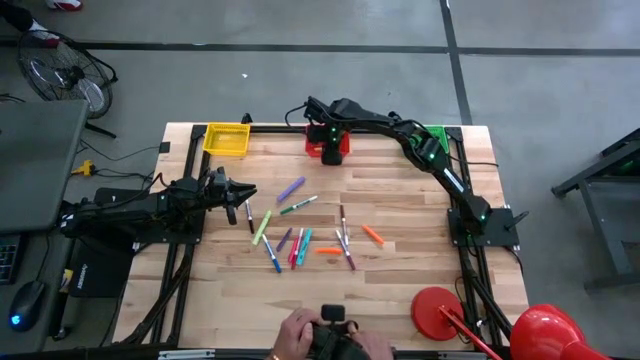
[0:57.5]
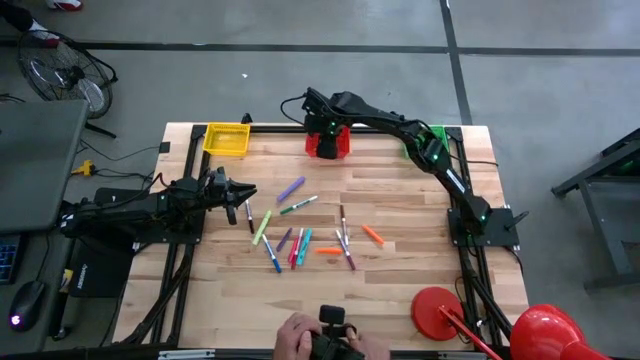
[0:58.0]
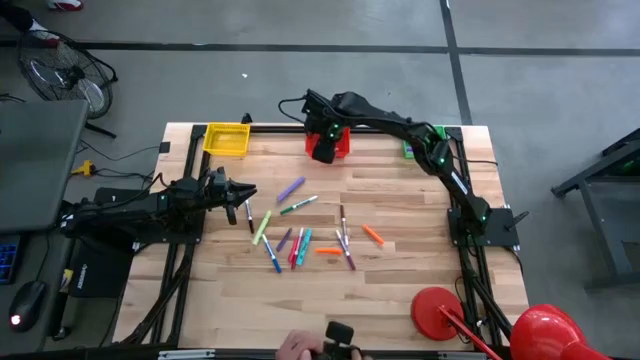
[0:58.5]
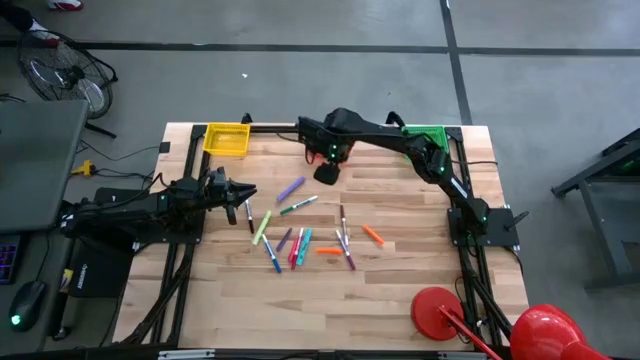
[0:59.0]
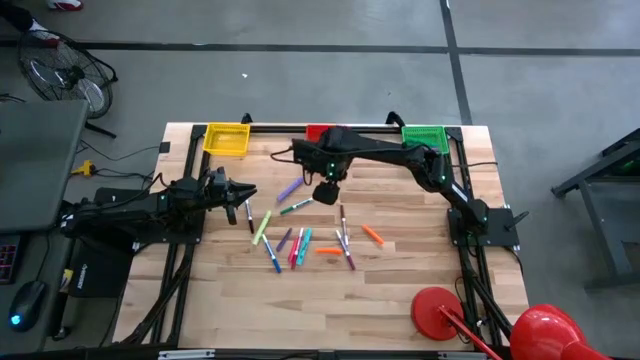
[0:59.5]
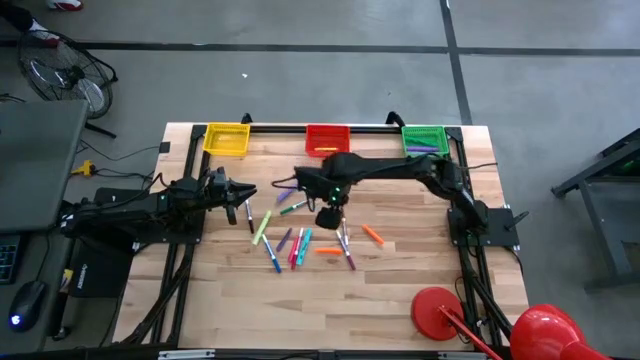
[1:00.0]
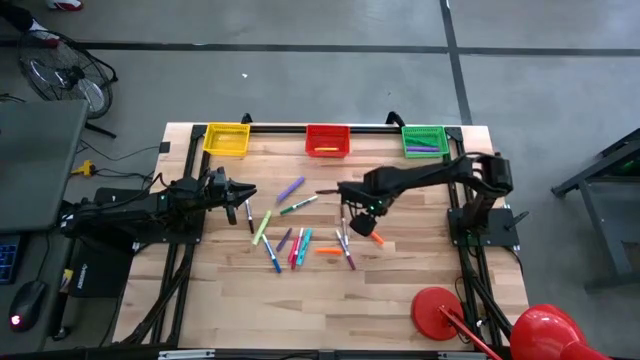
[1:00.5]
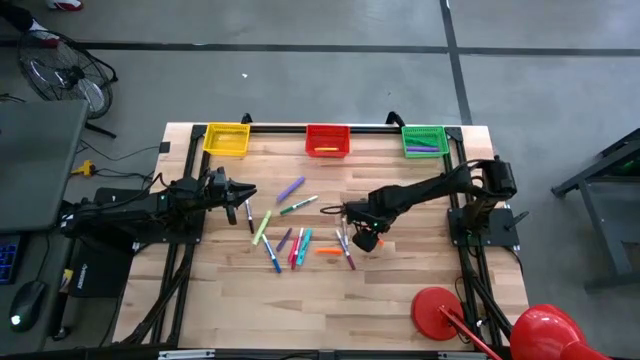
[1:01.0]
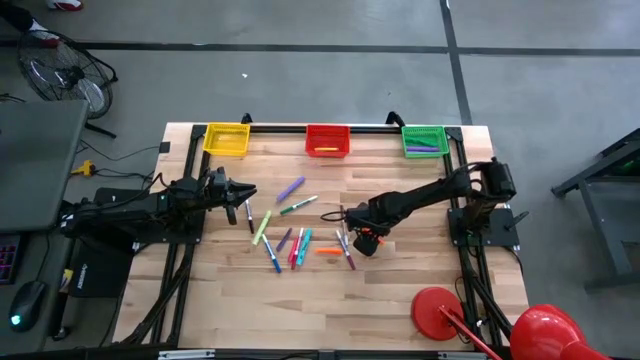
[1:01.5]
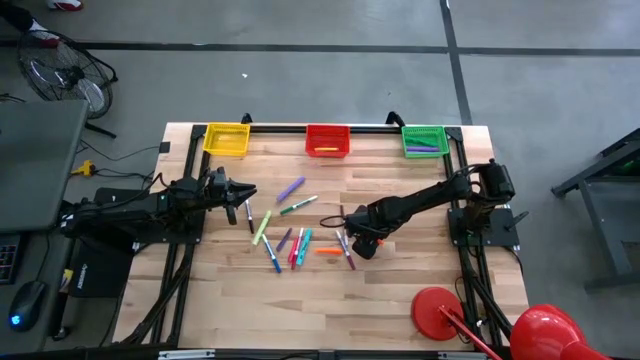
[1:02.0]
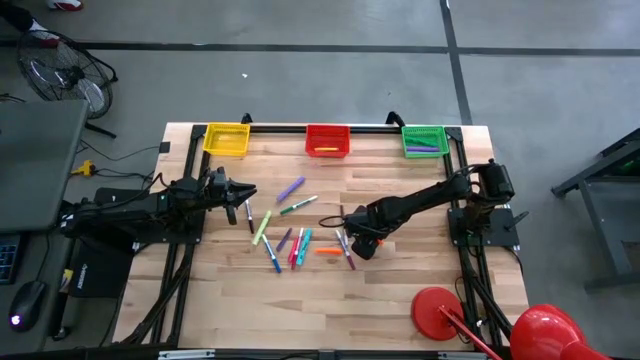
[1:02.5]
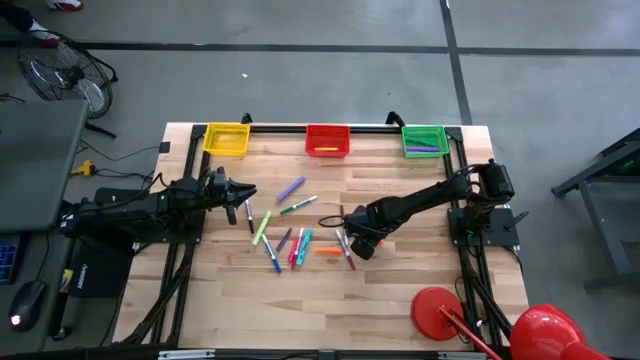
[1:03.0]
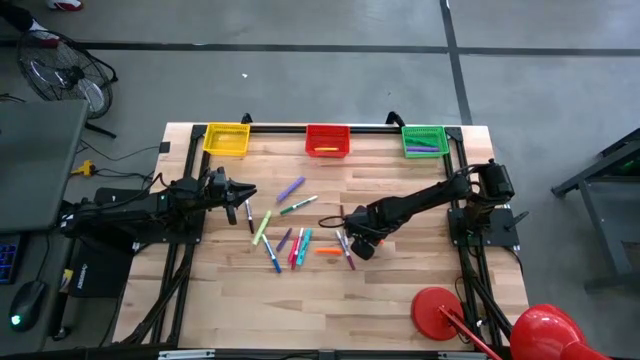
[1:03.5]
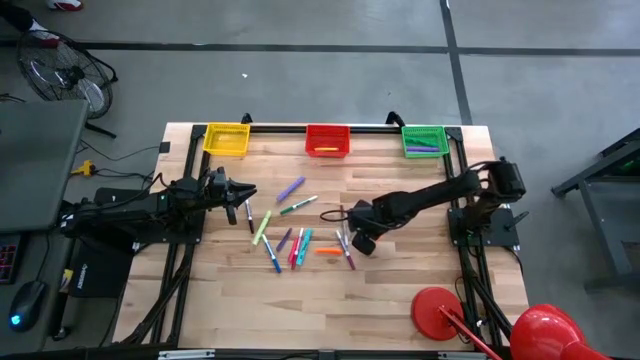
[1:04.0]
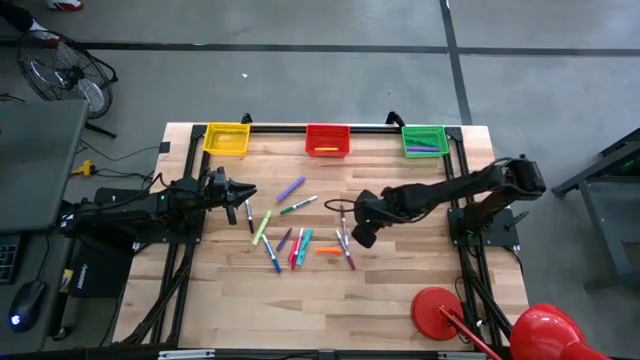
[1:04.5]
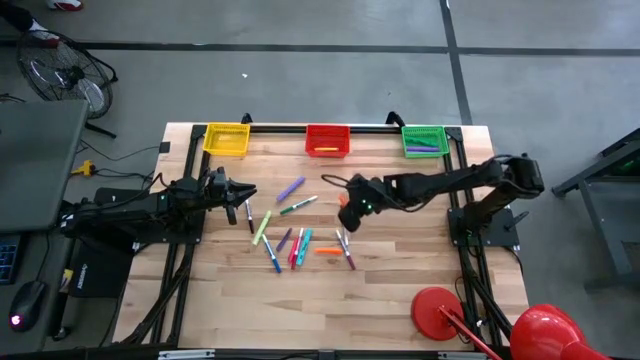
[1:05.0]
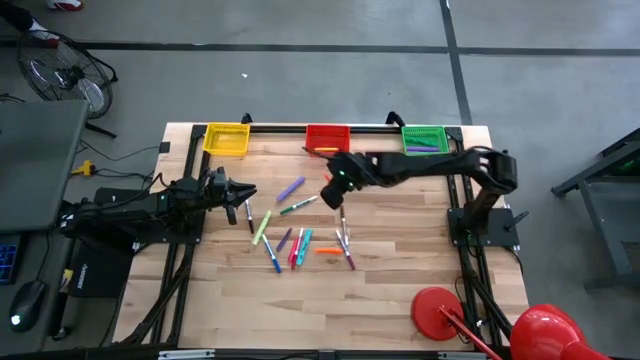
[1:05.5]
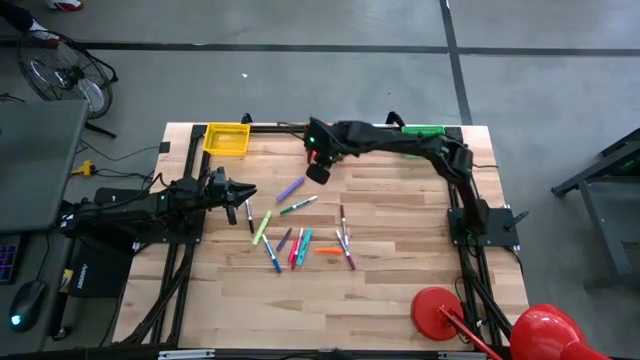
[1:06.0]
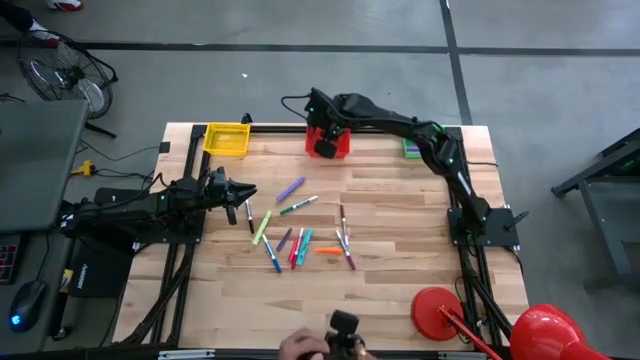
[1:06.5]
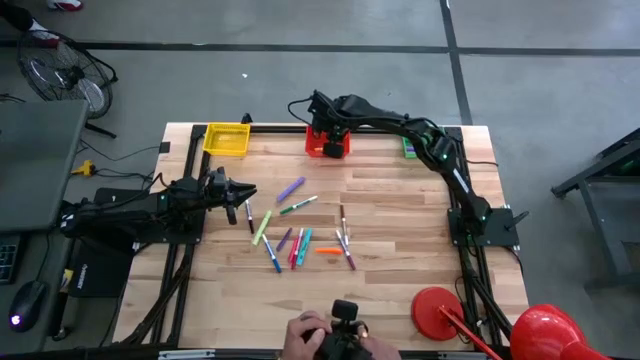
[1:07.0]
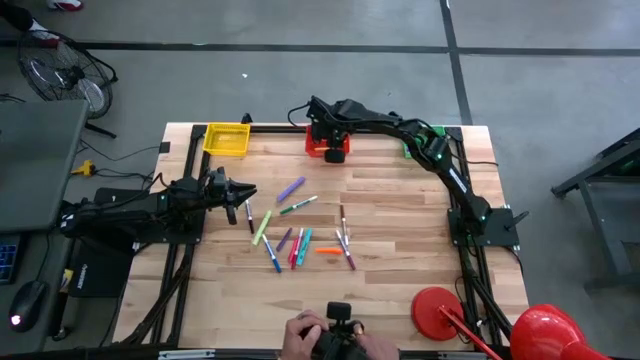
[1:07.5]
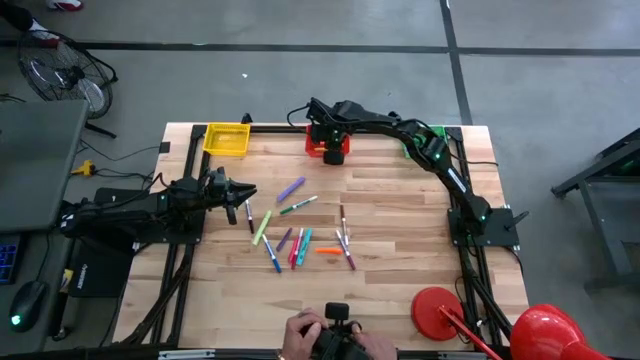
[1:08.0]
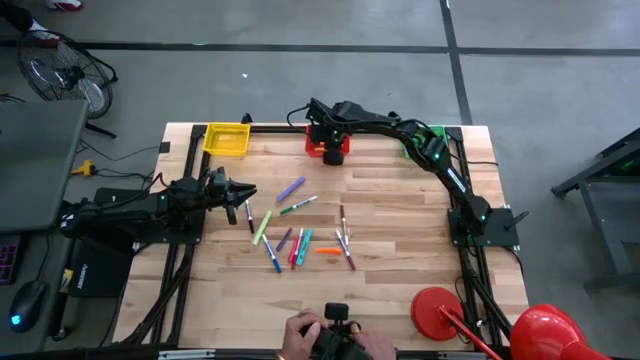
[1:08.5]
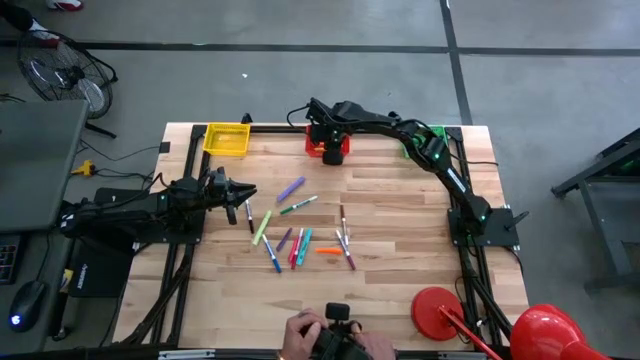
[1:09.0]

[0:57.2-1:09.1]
Task: Pick & Place Markers
Put the orange pen into the red bin

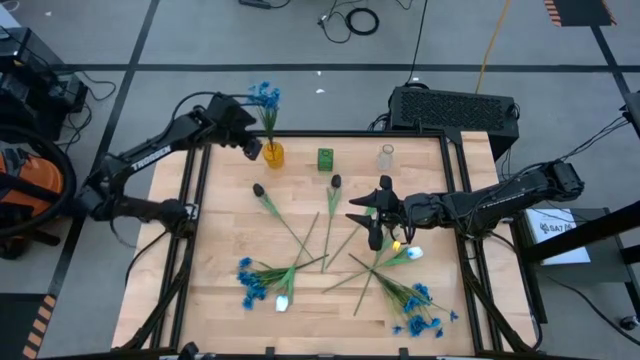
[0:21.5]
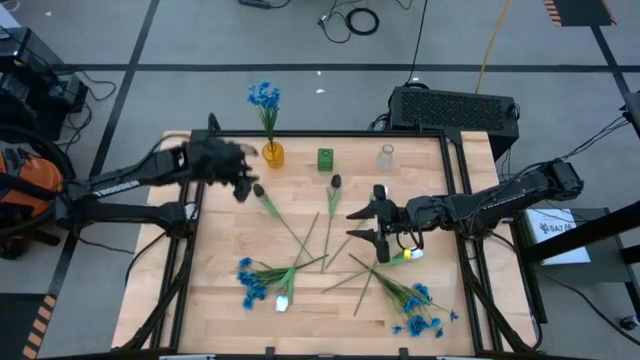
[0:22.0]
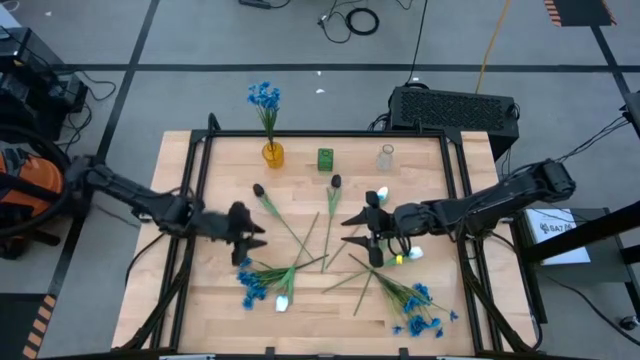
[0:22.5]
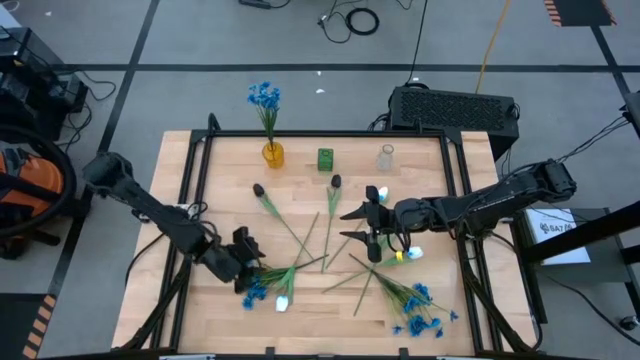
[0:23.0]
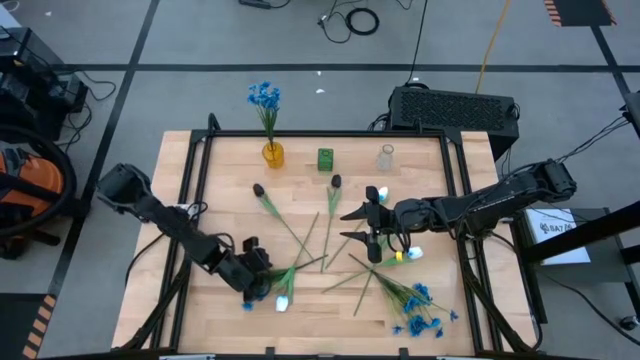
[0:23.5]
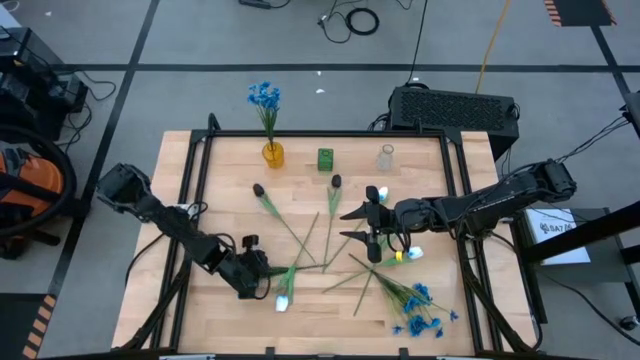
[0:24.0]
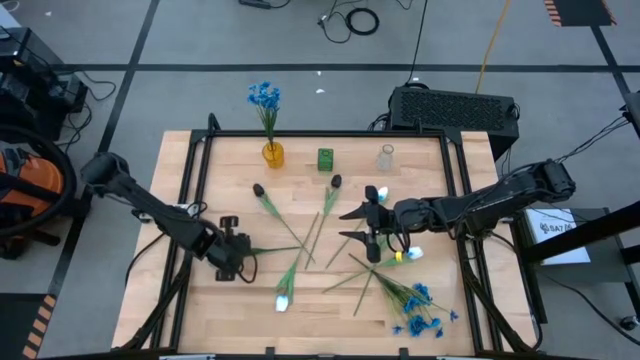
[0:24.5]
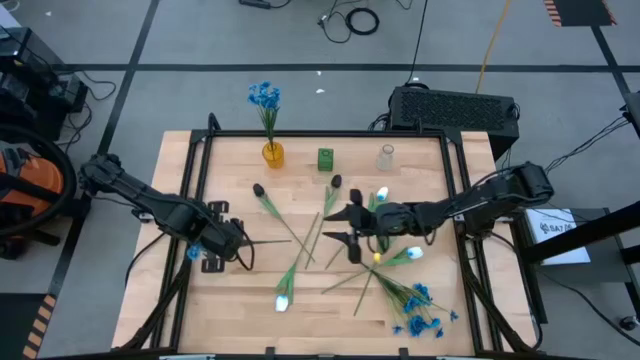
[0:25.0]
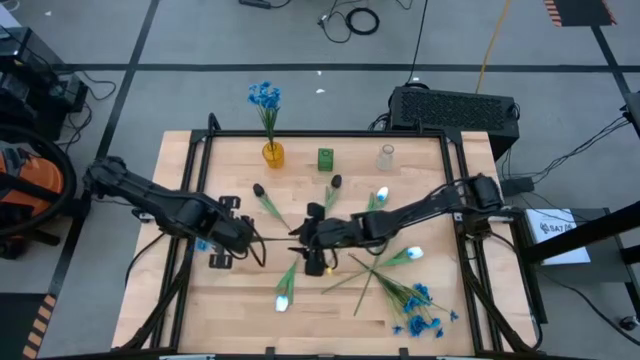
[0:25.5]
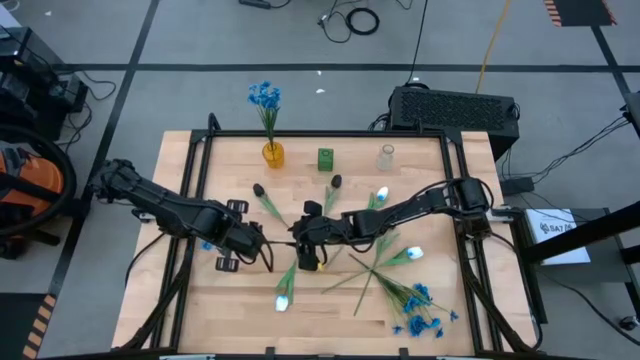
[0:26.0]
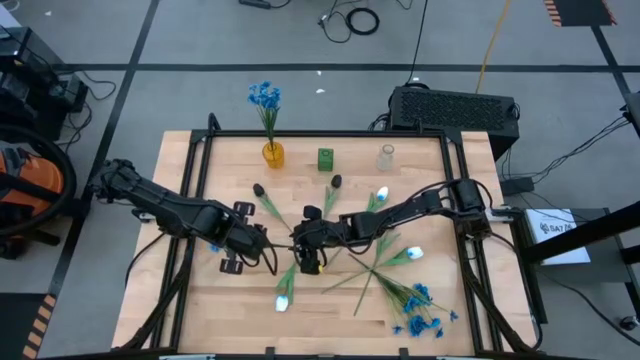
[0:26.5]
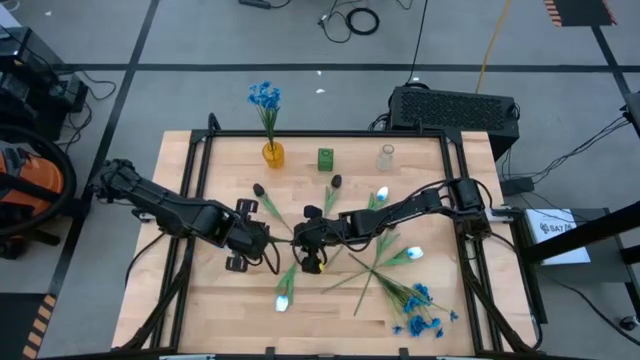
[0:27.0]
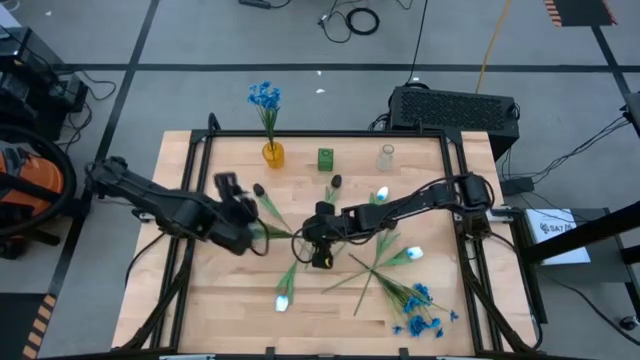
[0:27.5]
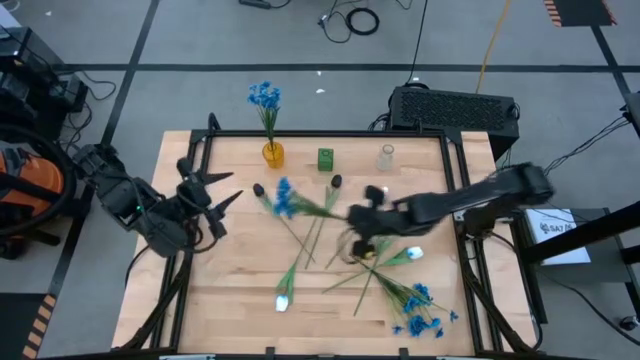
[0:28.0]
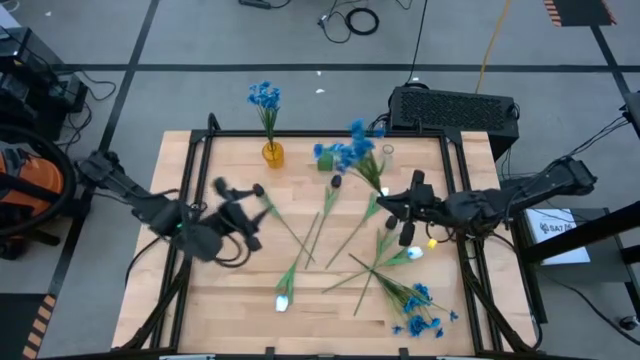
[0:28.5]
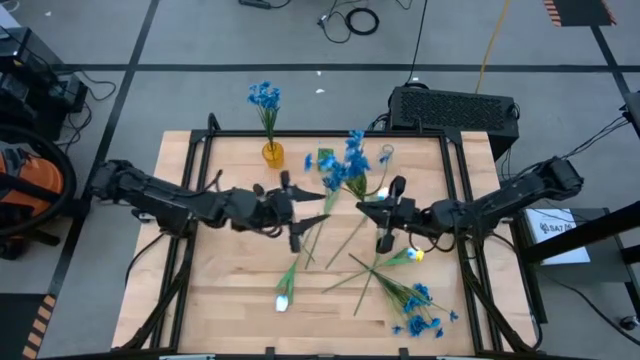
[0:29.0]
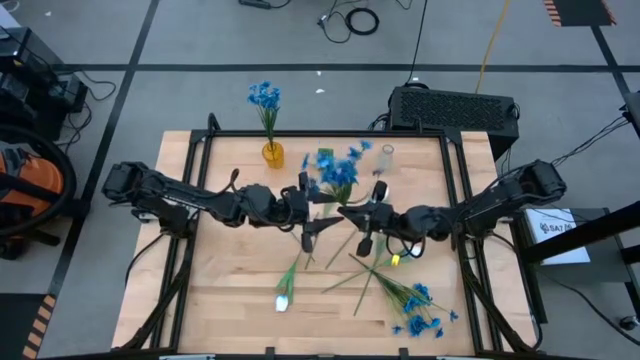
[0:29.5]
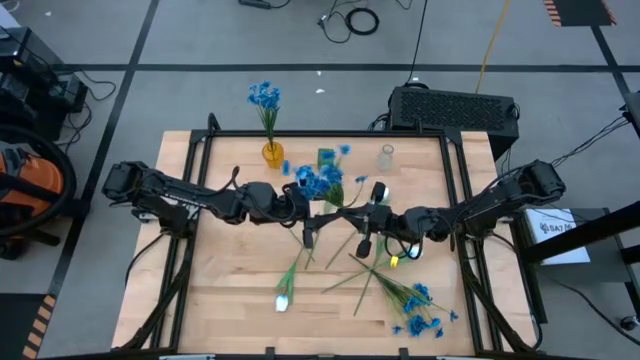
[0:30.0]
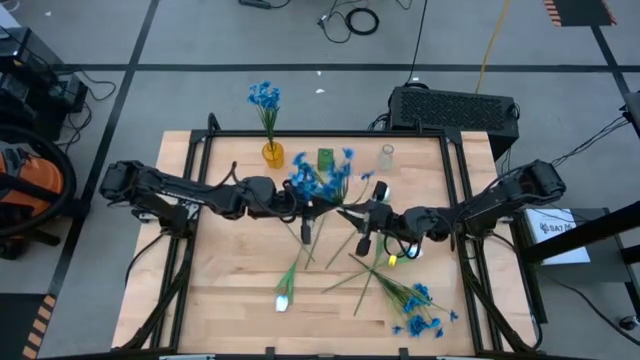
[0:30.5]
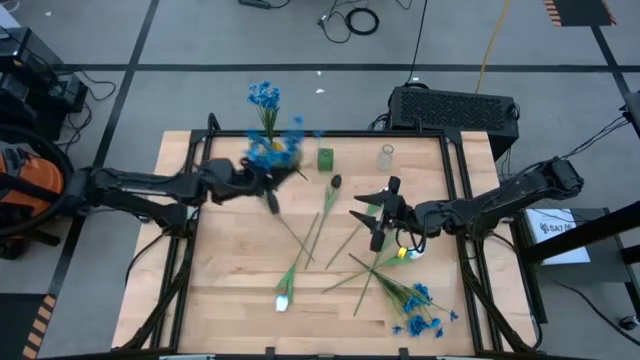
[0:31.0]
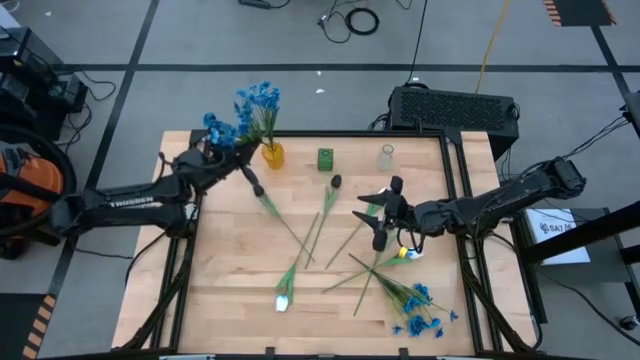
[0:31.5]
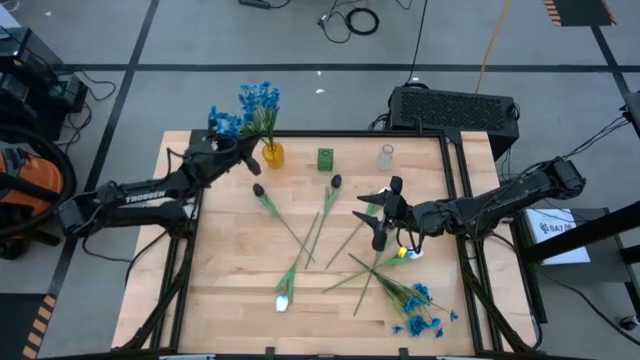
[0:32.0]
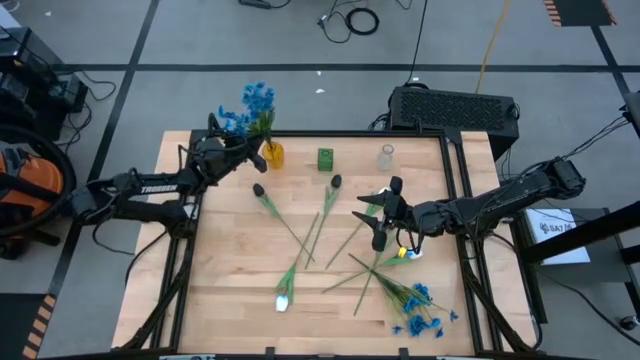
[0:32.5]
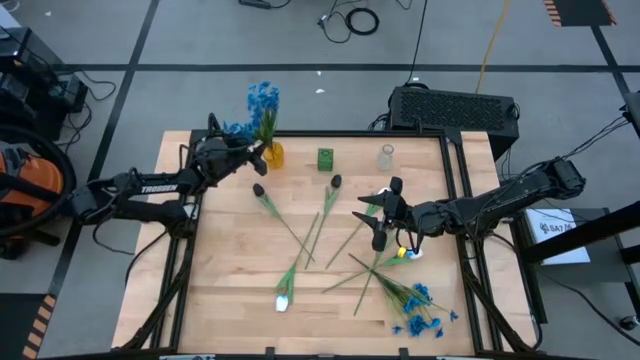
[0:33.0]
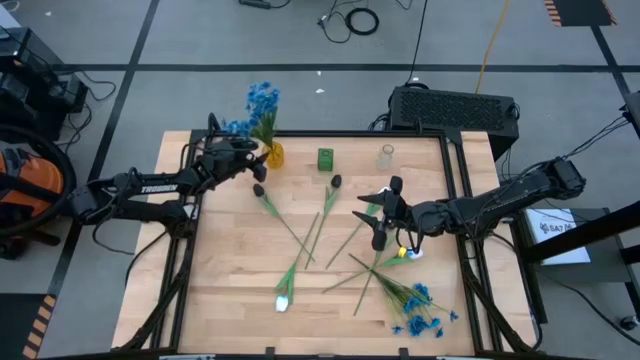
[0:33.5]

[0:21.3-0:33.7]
Task: Sort flowers into vase by color
Put the left blue flowers into the yellow vase
